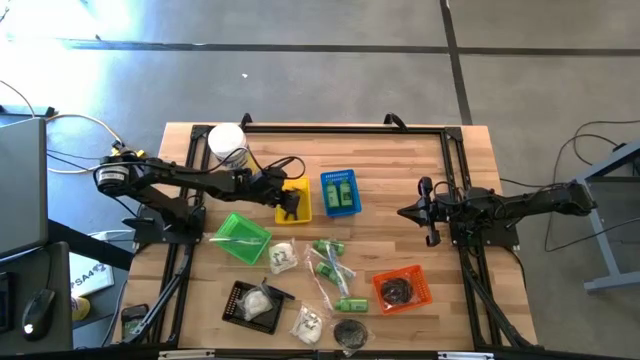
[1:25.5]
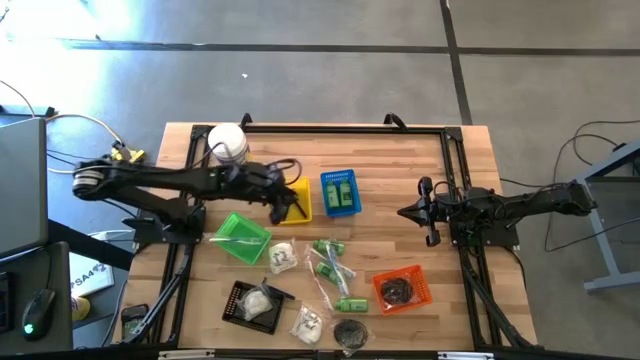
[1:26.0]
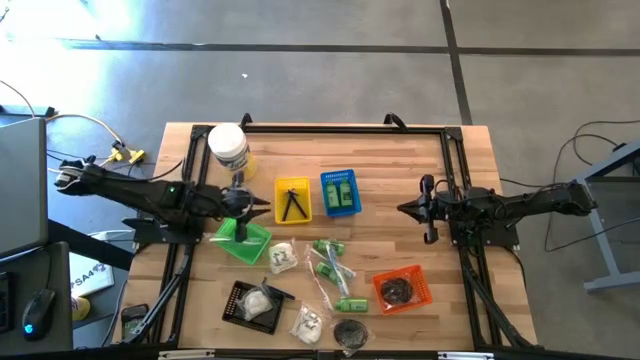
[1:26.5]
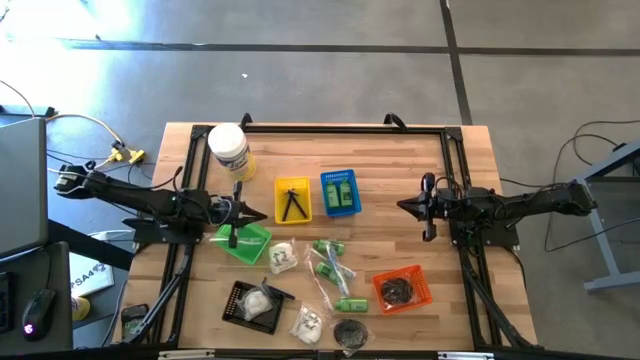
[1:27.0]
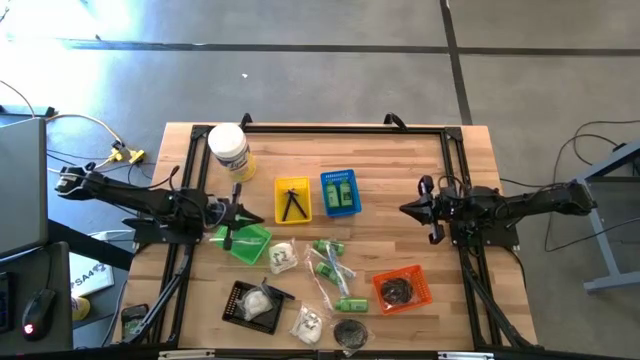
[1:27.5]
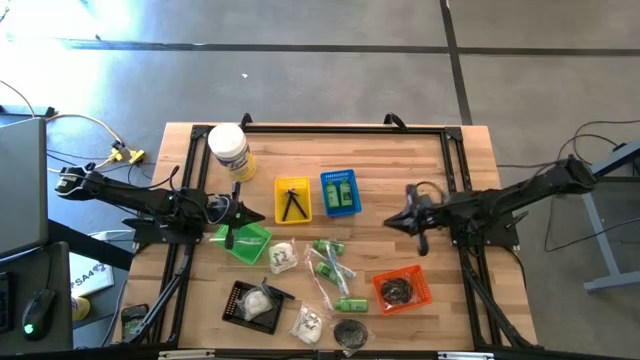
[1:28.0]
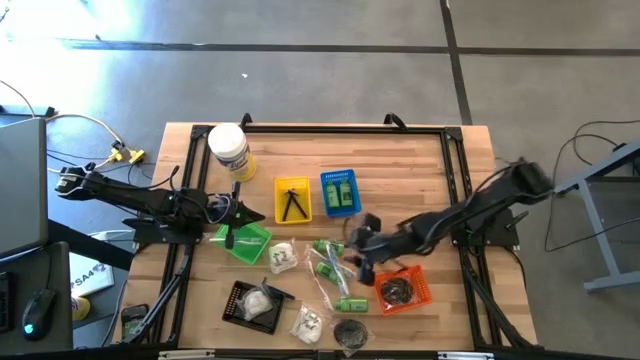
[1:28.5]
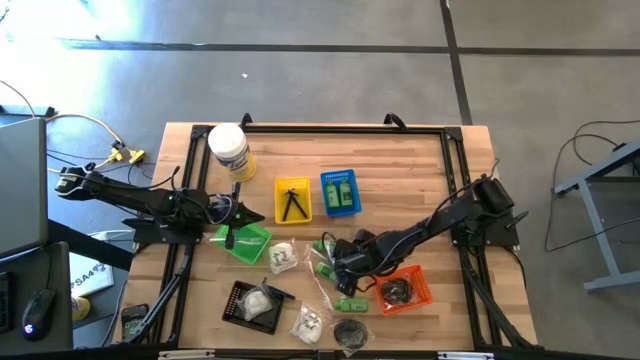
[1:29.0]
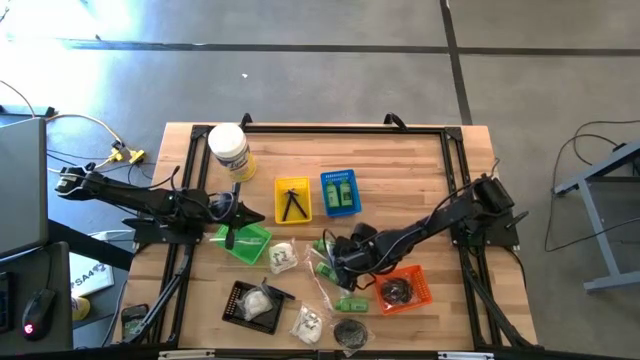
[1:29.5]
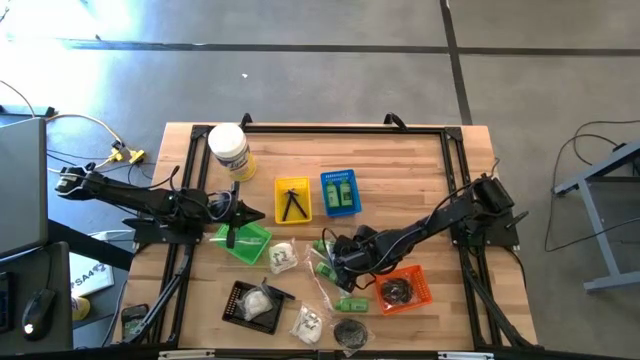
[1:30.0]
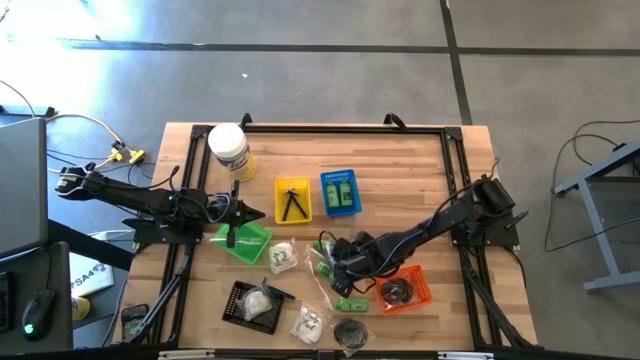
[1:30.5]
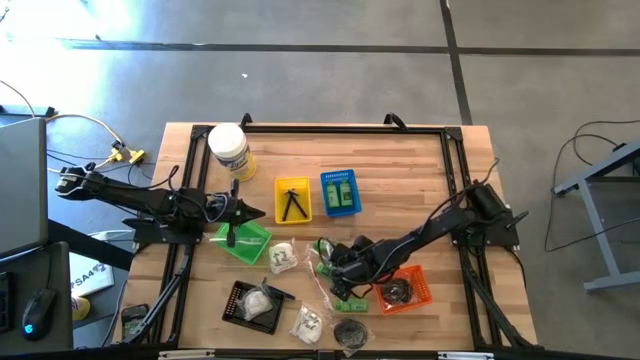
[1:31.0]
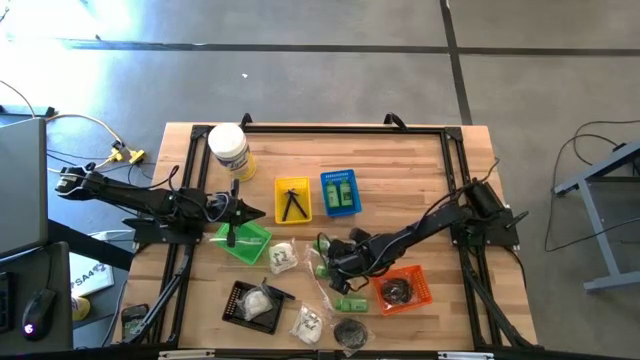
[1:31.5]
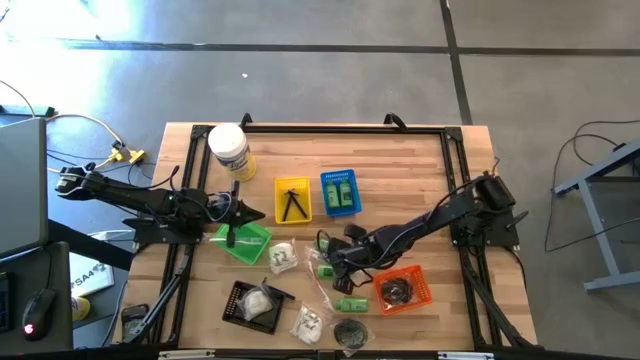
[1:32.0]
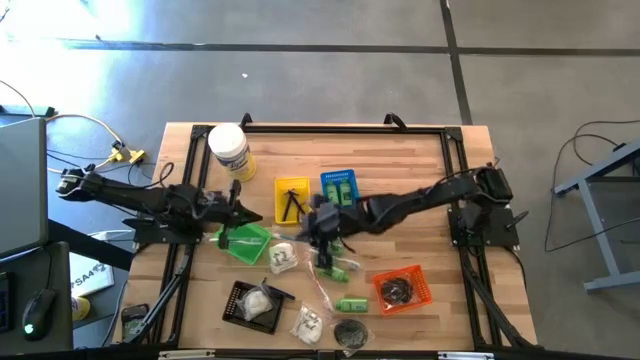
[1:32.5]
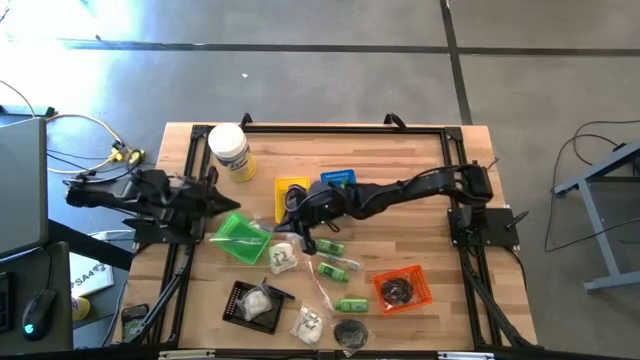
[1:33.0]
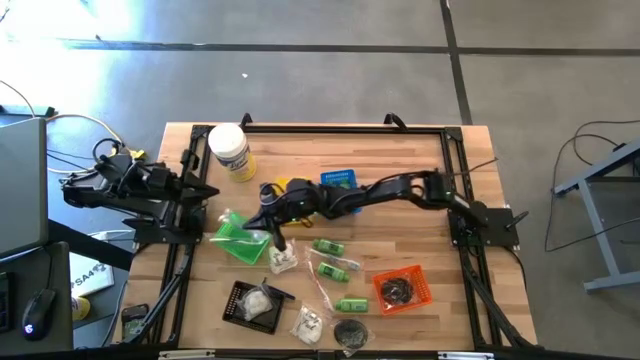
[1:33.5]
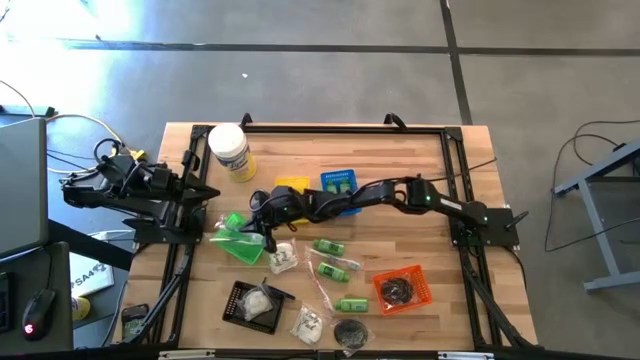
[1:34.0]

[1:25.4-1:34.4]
Task: Pick & Place Travel size toiletries
Put the blue toothbrush into the green bin

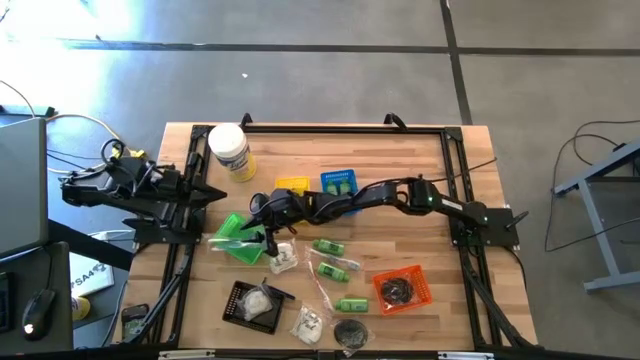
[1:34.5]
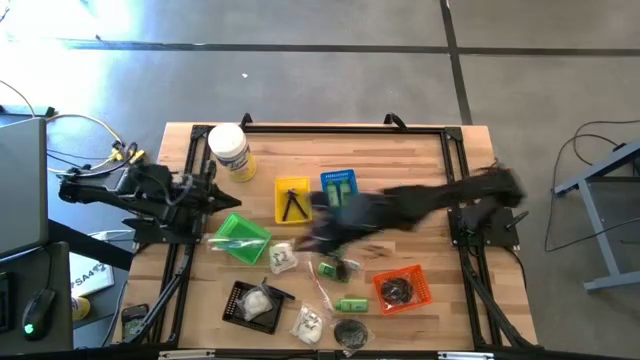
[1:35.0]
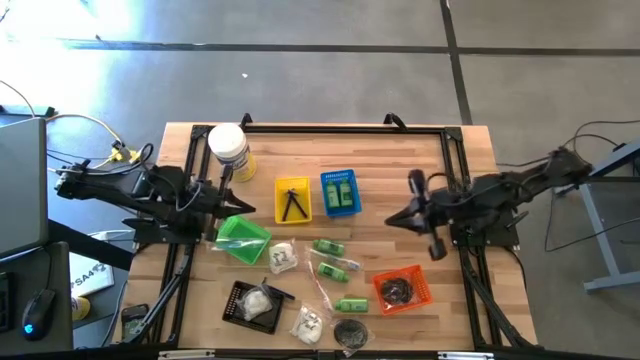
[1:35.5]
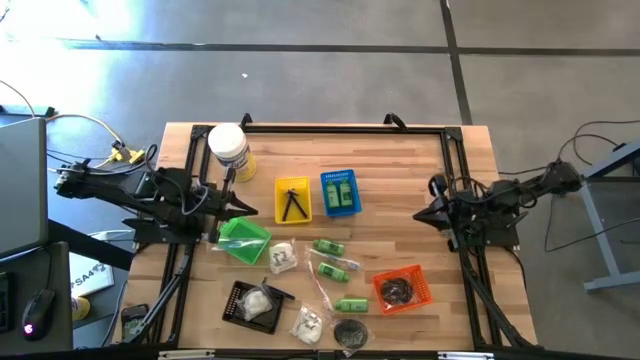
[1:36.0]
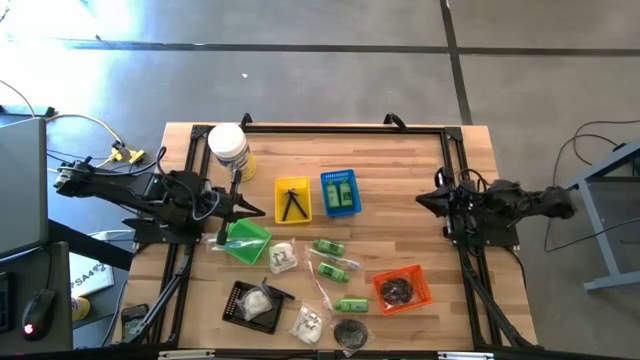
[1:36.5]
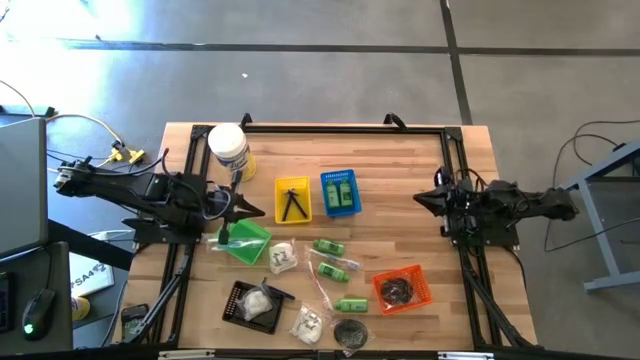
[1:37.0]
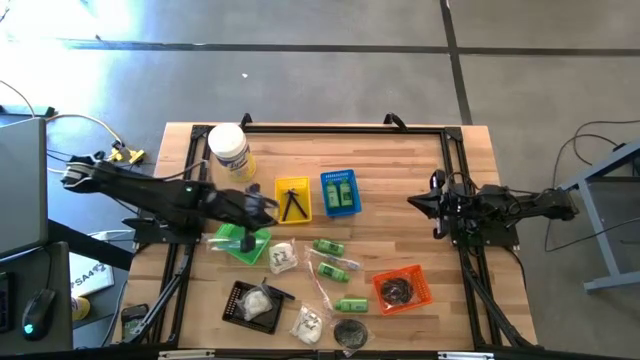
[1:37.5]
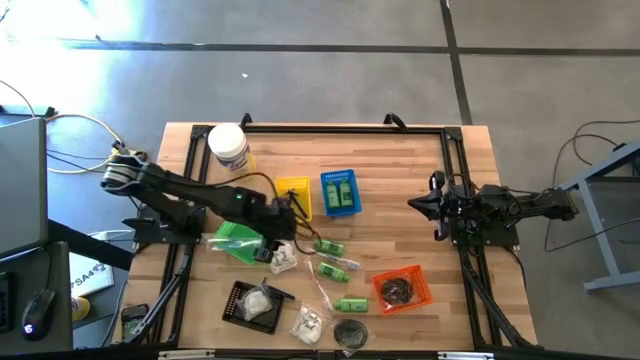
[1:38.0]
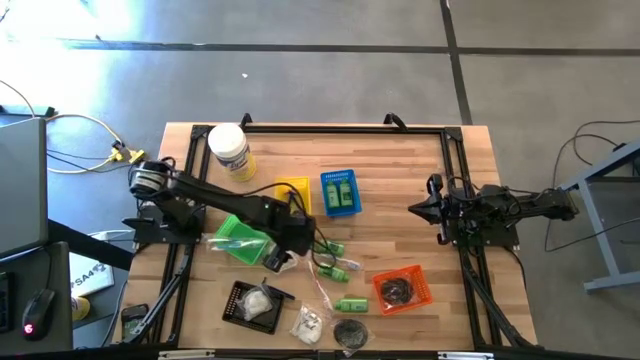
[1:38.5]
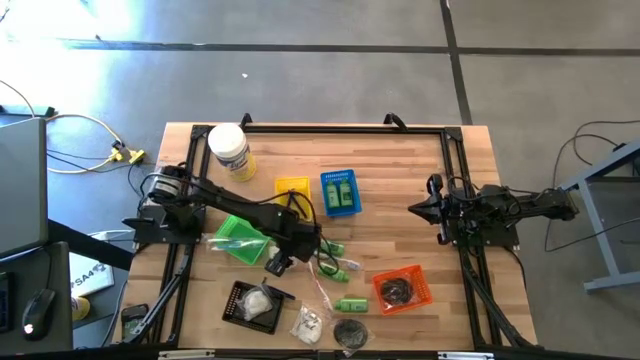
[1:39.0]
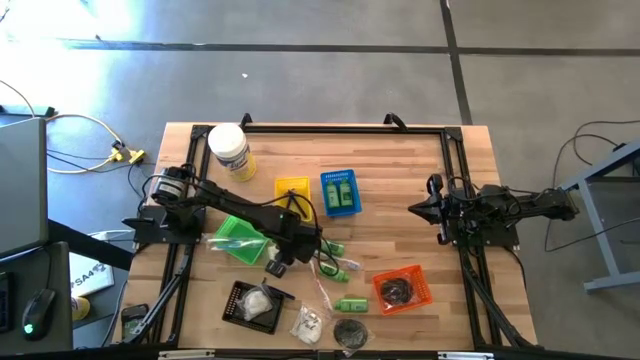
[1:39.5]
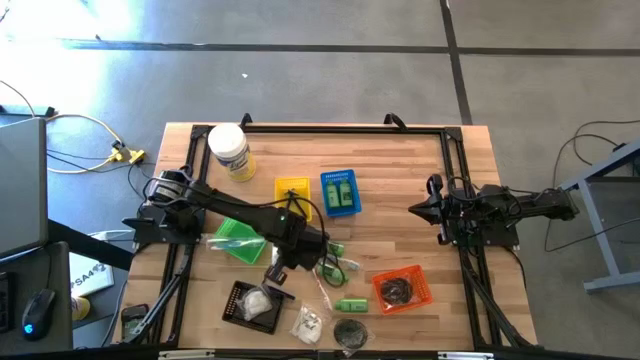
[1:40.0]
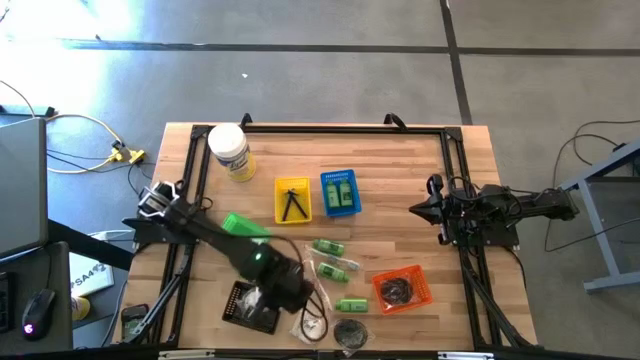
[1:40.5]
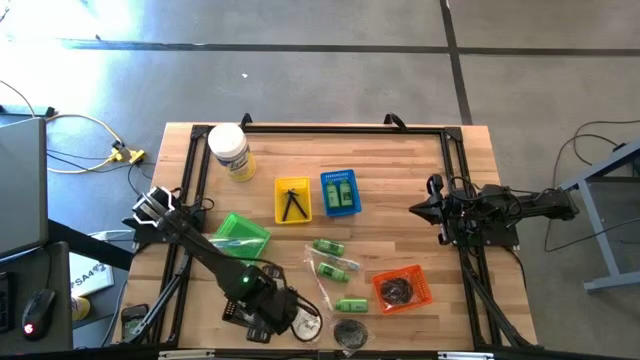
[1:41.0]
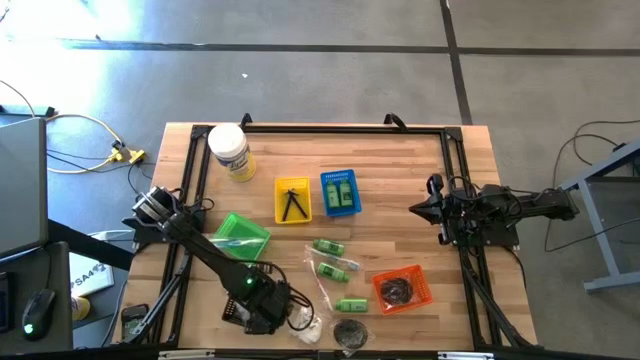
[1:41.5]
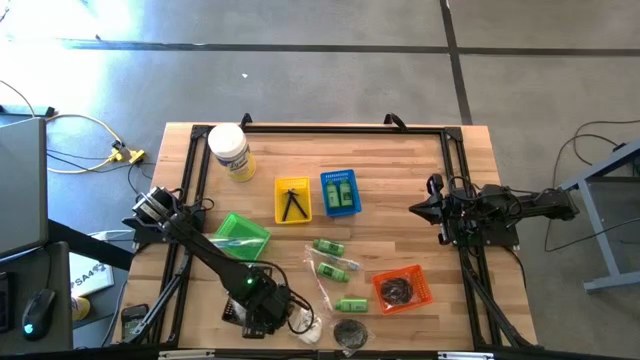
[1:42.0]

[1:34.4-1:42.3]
Put the cotton pack into the black bin

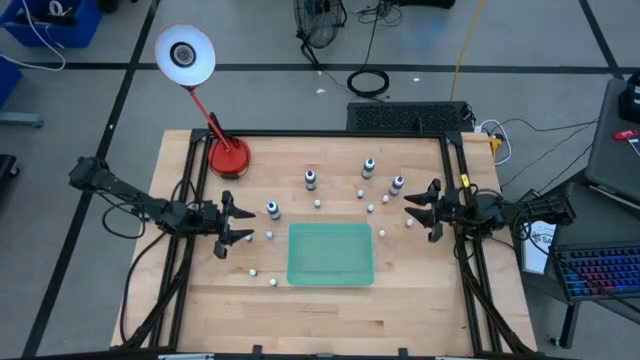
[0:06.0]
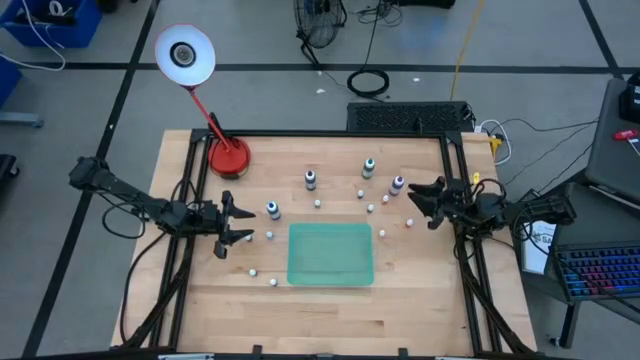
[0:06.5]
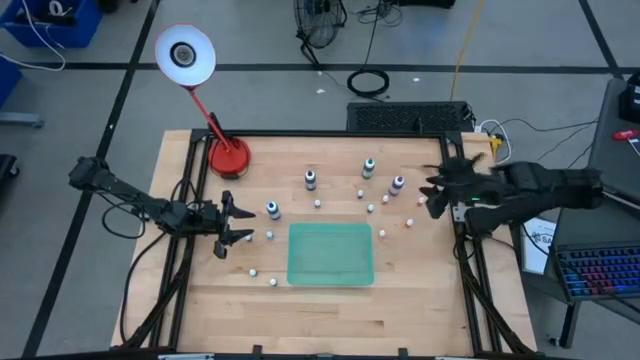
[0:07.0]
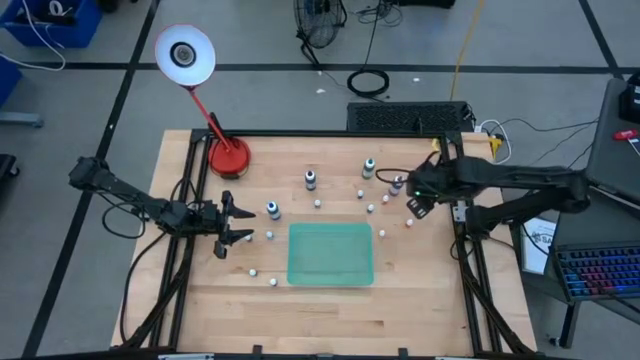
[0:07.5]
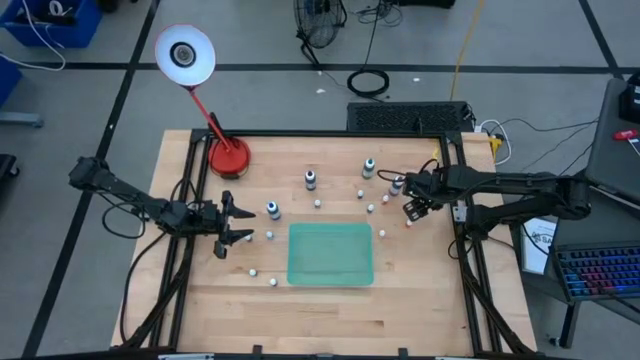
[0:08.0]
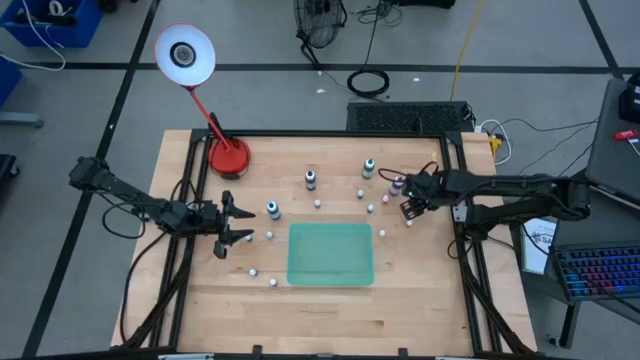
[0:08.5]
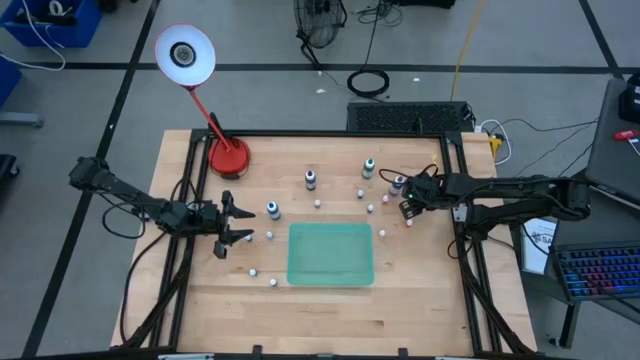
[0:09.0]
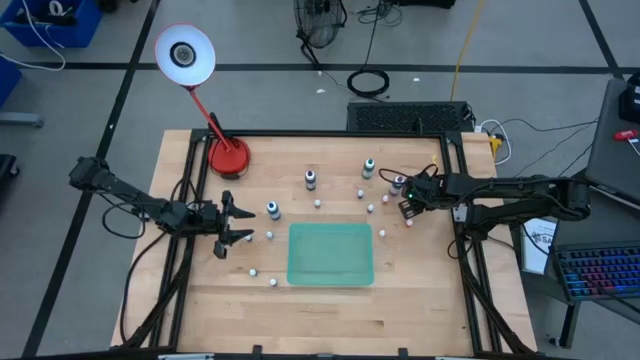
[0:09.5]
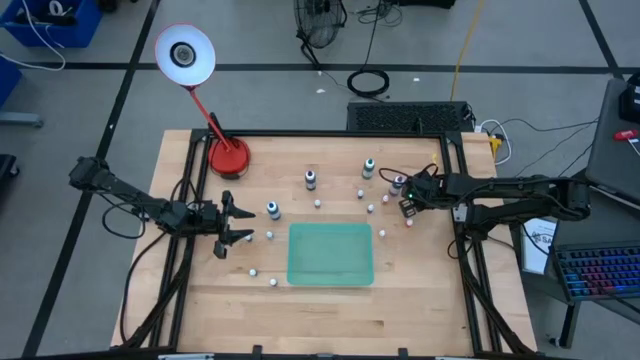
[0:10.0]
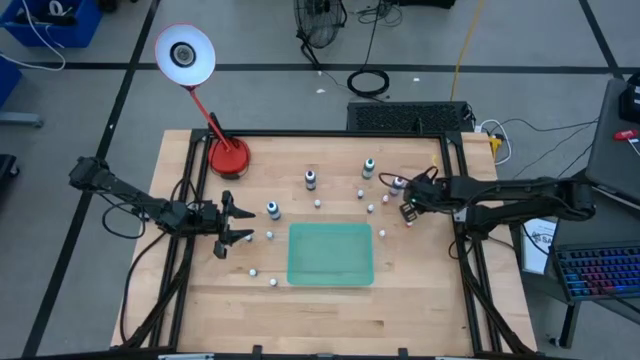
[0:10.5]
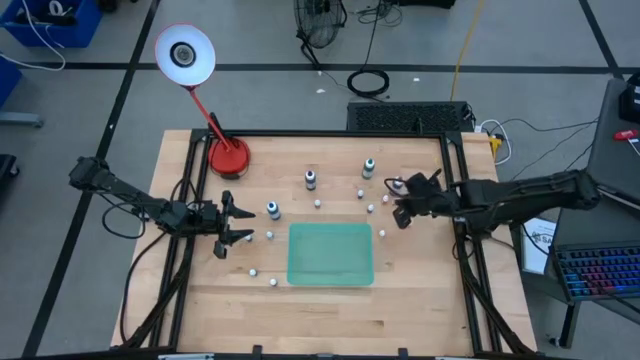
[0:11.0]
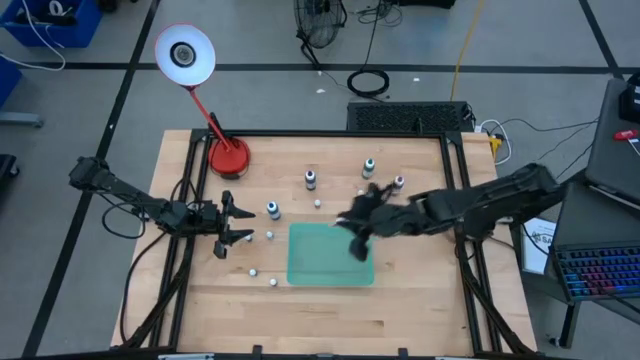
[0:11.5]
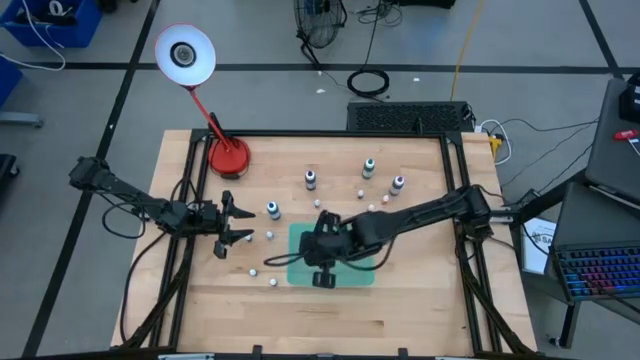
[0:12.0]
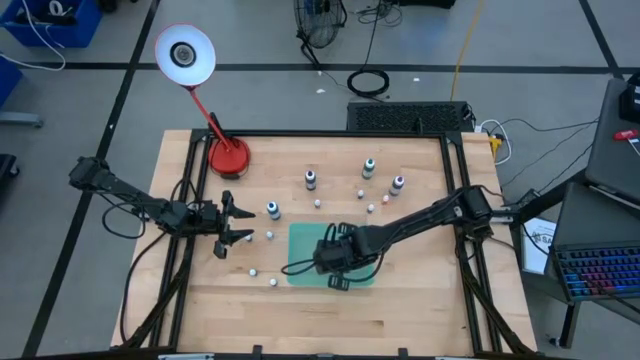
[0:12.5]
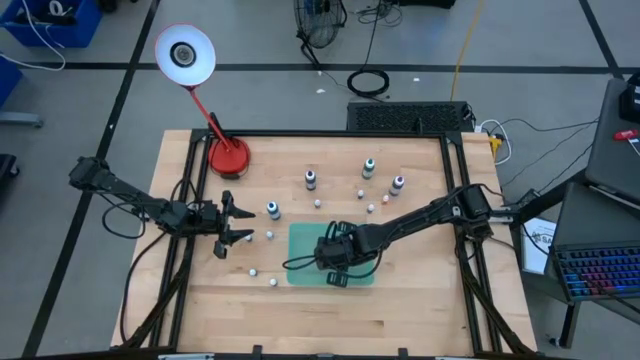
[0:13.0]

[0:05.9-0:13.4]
Task: Pick & Place food coloring
Put the small yellow food coloring bottle into the green bin
